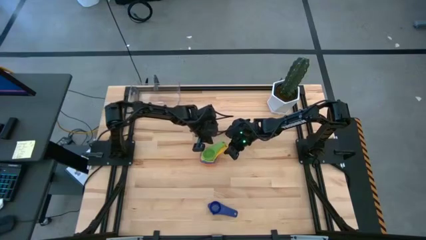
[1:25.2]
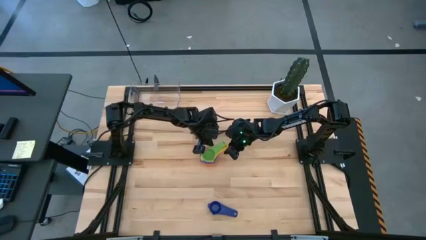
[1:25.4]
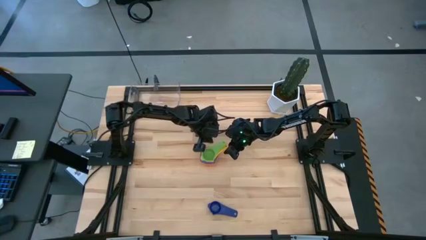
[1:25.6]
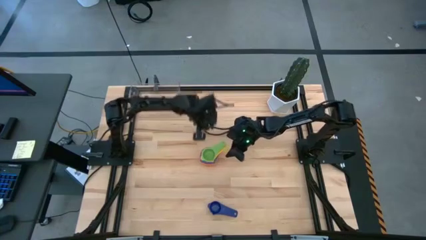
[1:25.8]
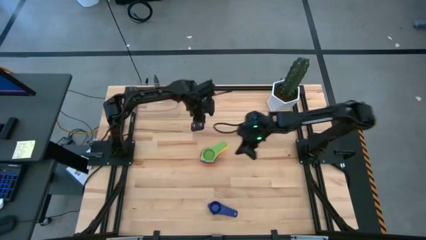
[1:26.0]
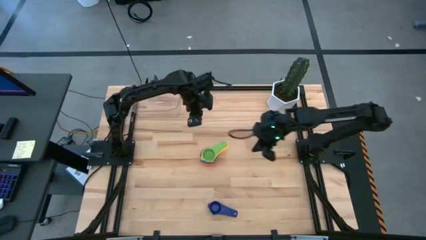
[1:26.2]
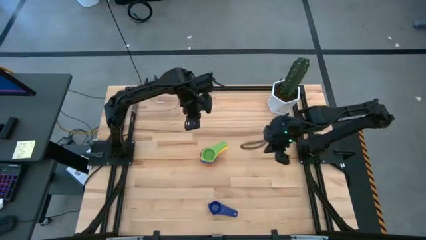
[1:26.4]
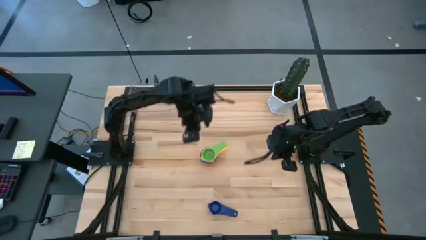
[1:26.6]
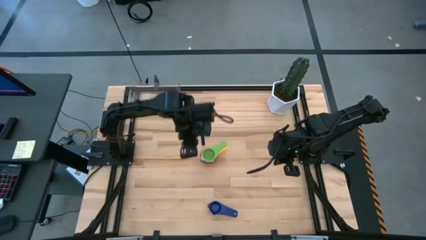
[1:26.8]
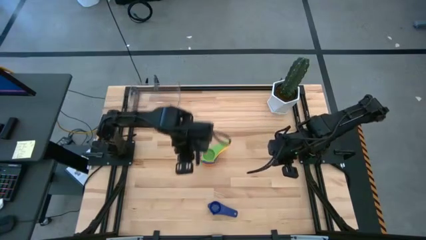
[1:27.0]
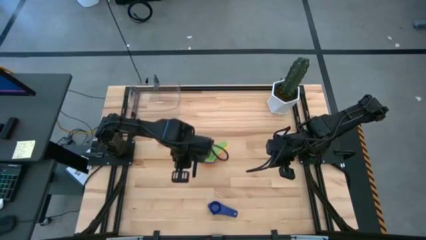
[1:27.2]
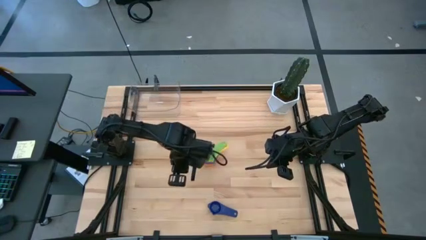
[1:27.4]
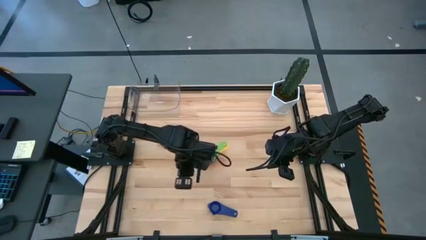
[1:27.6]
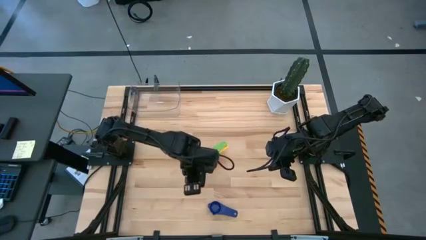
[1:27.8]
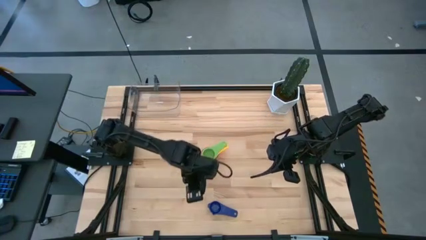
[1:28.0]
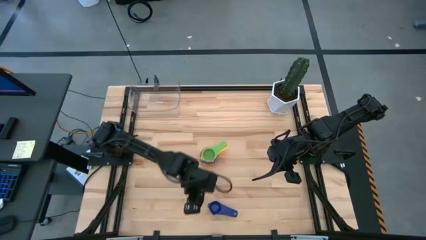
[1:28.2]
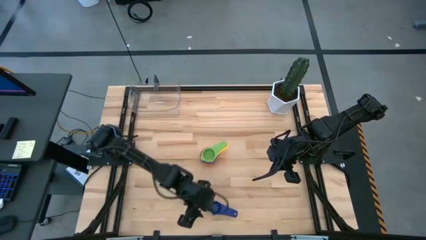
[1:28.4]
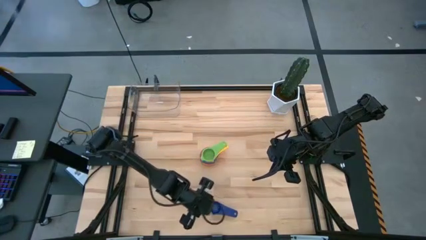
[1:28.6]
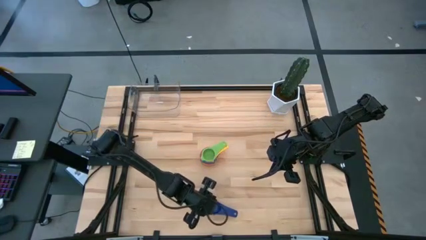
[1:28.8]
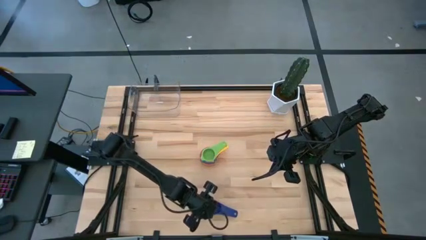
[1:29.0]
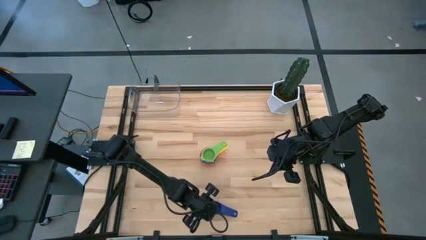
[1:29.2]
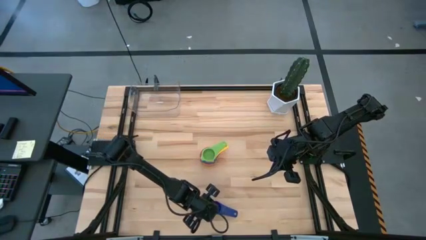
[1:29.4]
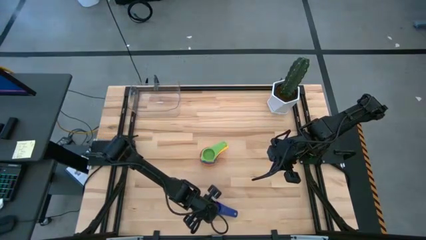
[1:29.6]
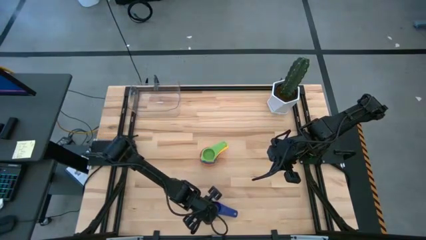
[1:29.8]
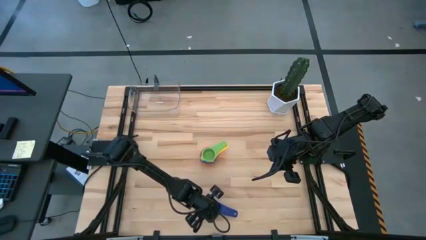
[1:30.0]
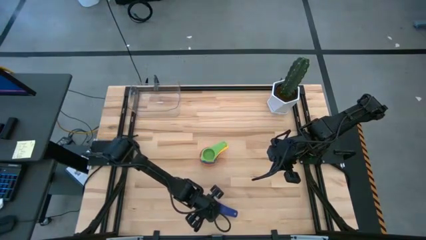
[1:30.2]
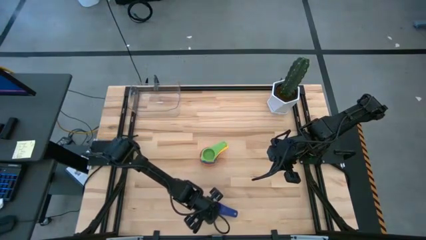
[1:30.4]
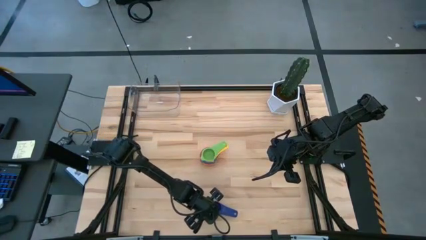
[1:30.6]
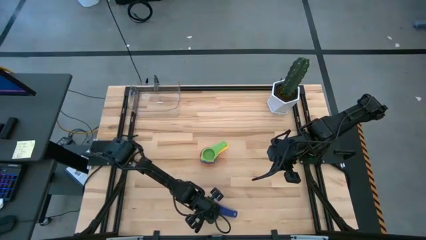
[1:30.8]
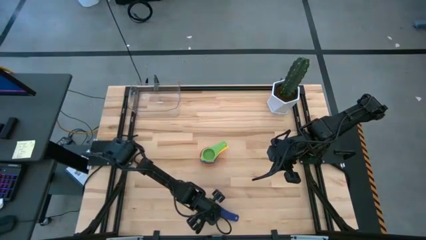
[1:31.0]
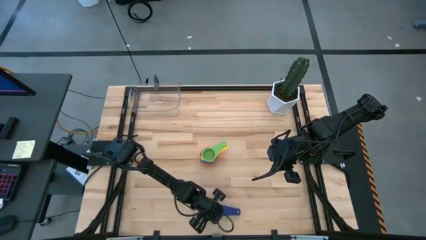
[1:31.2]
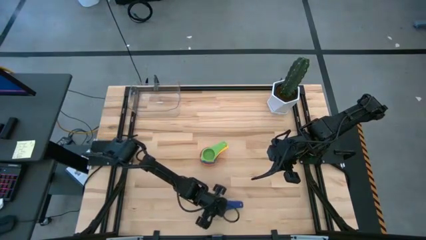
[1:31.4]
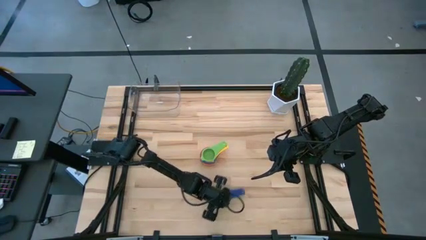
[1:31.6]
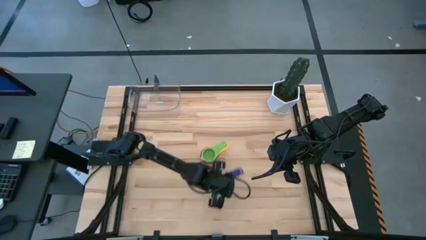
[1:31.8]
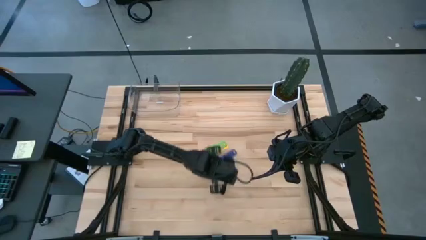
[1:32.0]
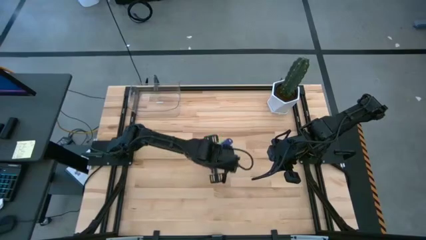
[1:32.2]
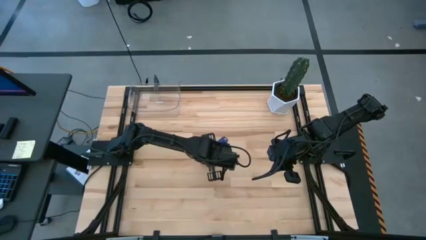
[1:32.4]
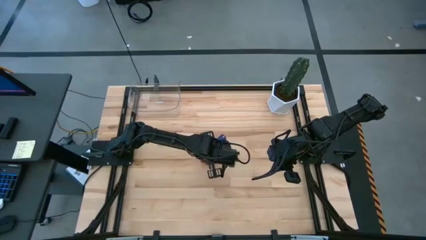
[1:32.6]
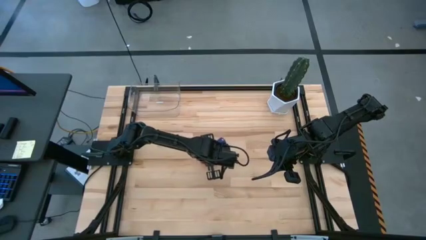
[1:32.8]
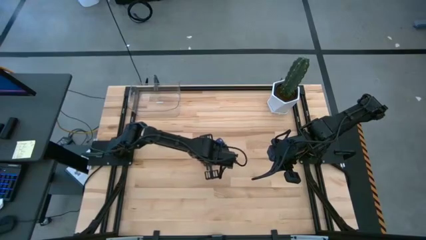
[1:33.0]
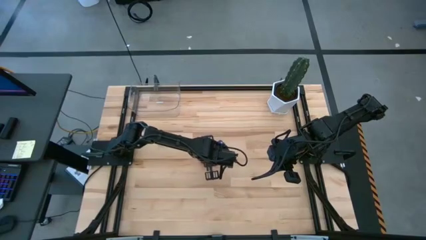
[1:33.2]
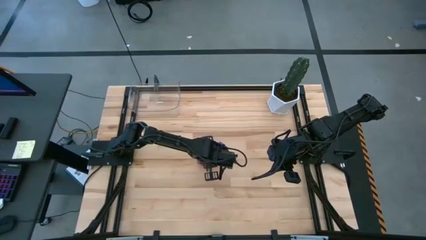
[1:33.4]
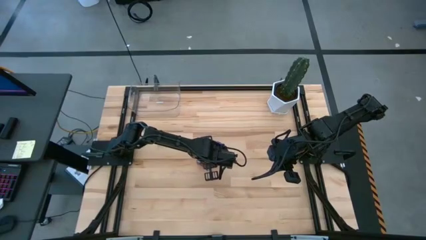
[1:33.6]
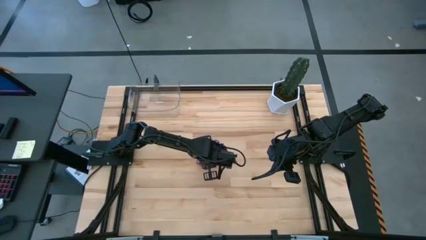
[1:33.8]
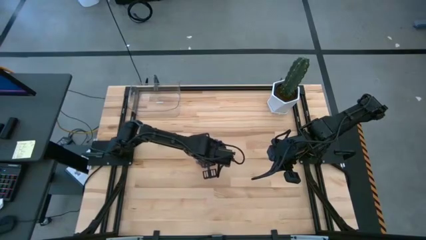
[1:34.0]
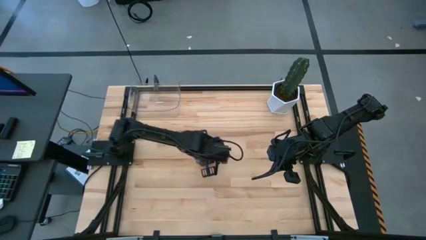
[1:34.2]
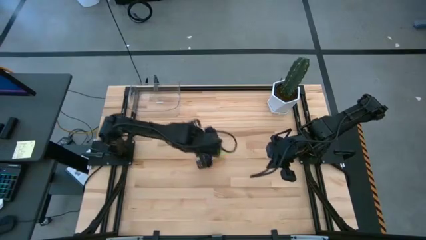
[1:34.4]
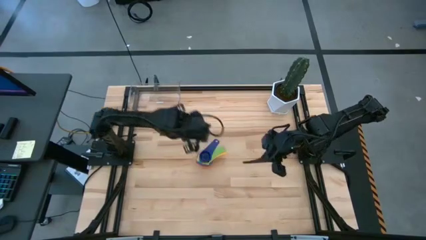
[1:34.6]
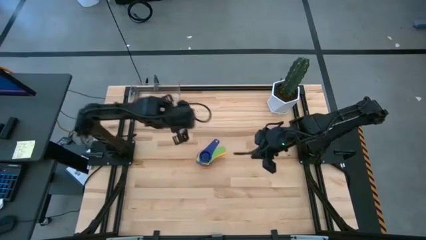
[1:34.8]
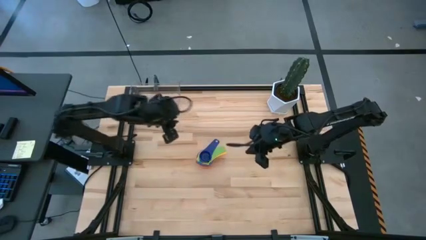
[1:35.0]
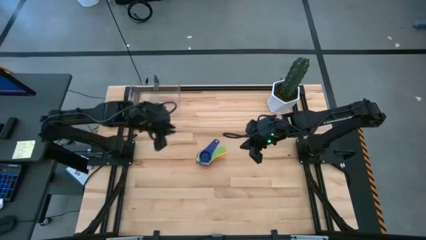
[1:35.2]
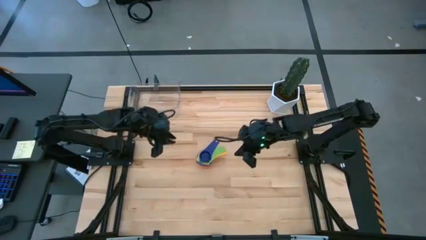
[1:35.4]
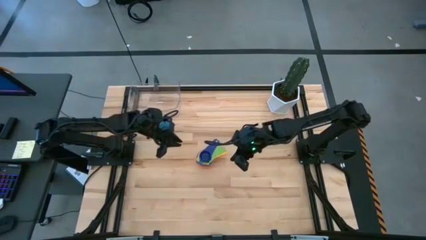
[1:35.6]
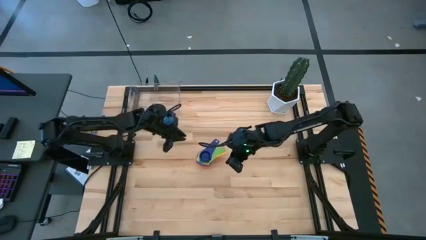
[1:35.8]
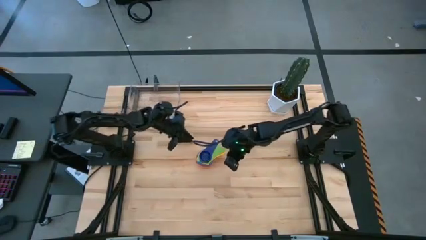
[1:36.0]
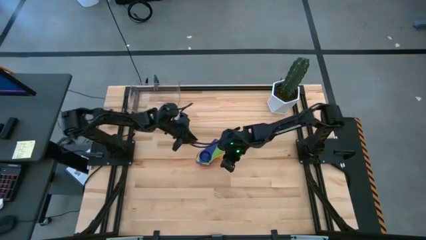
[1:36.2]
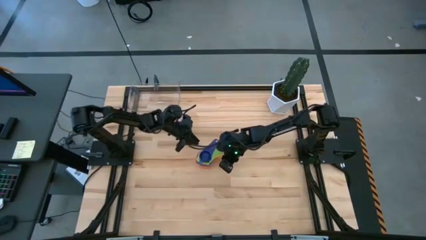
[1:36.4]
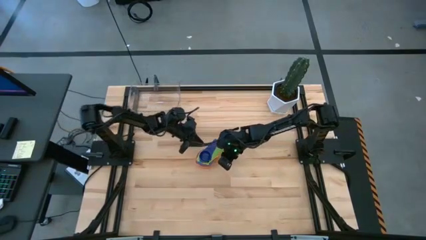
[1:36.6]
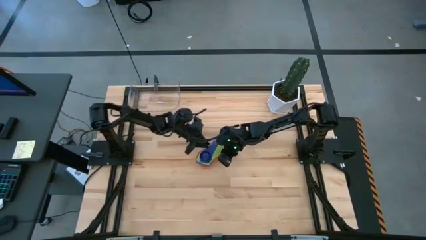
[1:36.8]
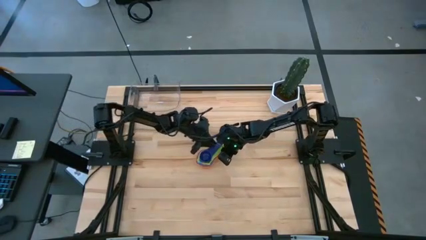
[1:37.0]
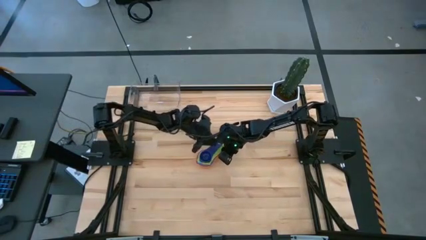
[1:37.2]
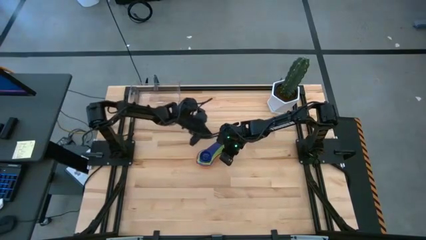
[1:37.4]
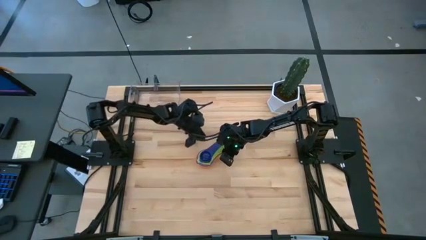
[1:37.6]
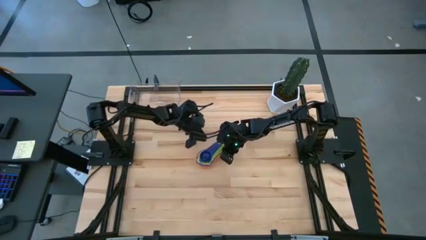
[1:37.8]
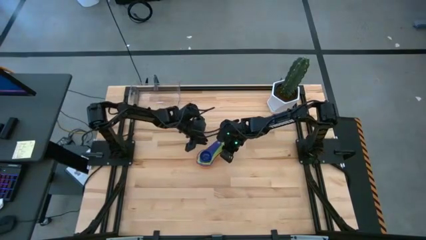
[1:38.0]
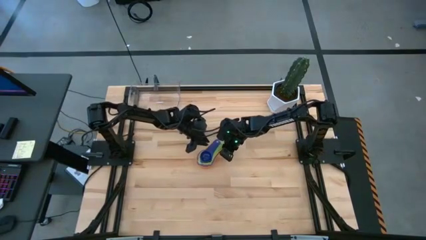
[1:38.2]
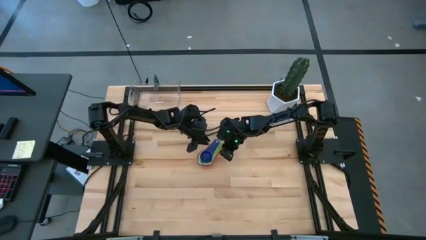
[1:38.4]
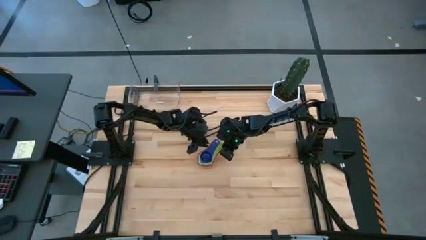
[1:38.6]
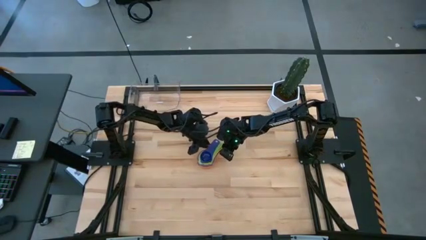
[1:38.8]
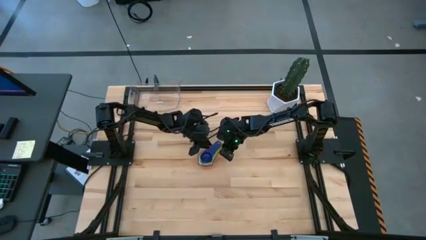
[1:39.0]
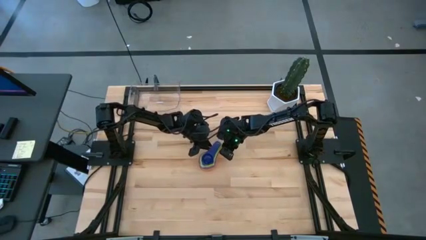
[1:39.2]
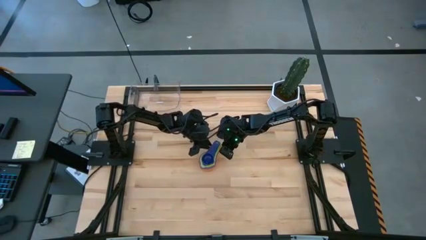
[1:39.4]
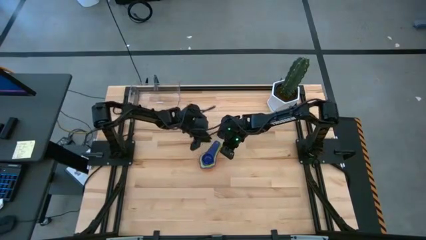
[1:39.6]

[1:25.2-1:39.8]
Task: Nest measuring cups in basket
Stack the dark blue nest measuring cup on top of the green nest measuring cup
